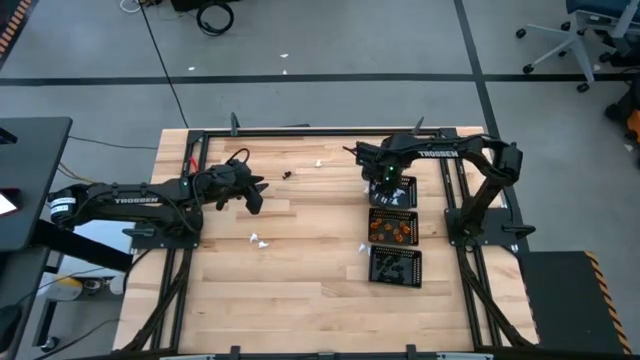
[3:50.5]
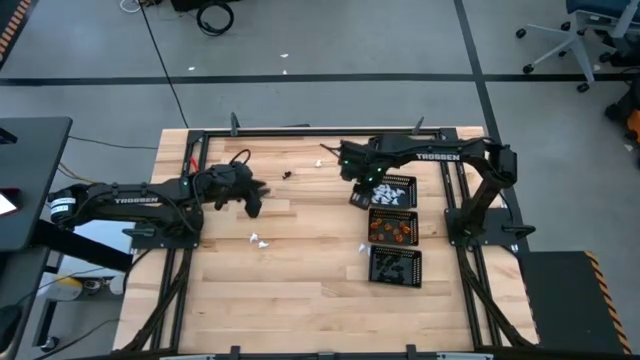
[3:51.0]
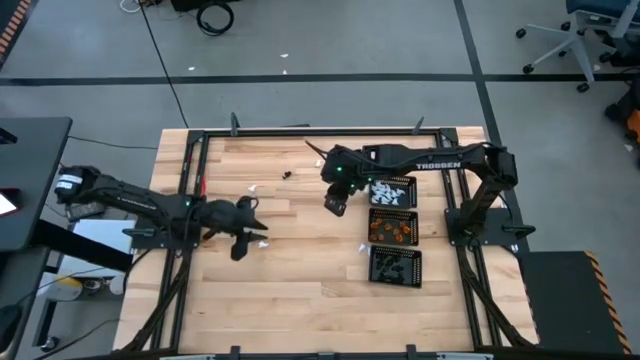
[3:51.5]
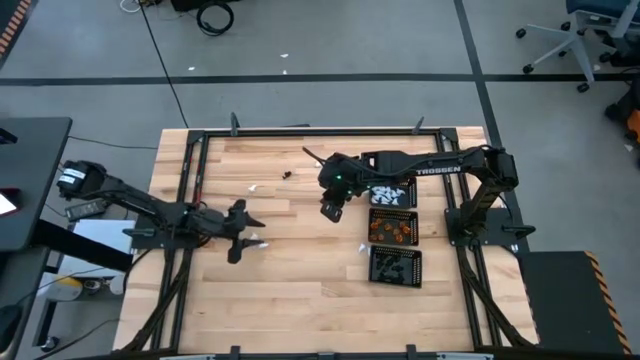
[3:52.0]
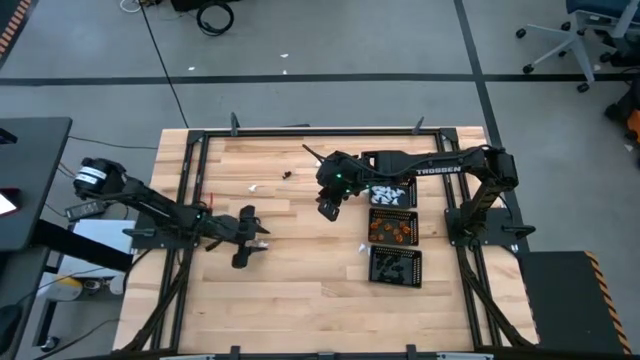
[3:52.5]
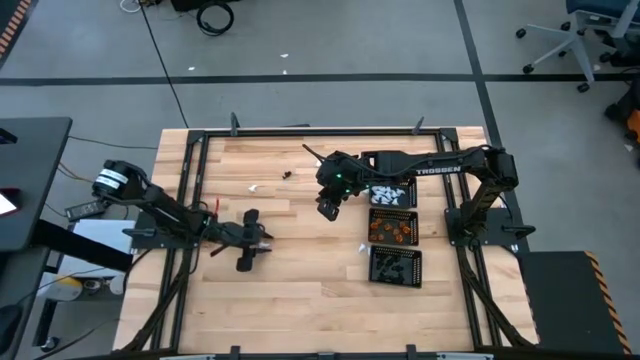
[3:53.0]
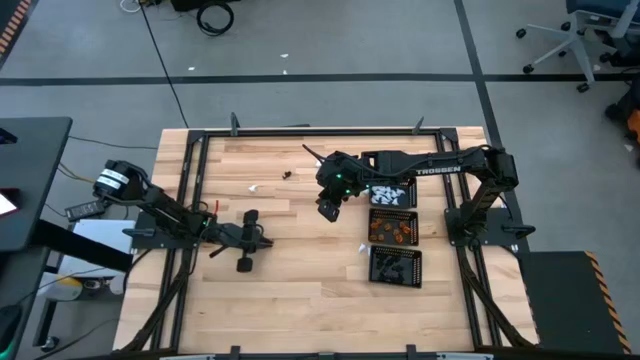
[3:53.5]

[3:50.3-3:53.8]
Task: Sort Halloween decoration
Put the white ghost toy into the top black bin

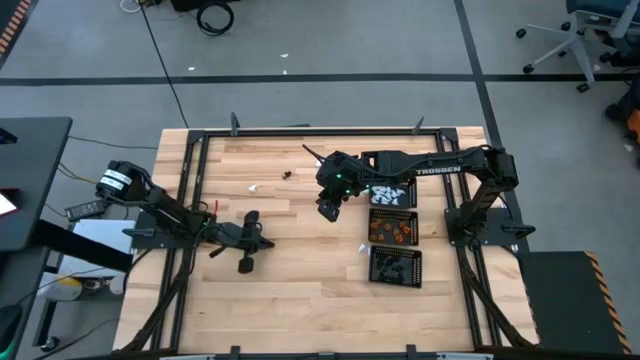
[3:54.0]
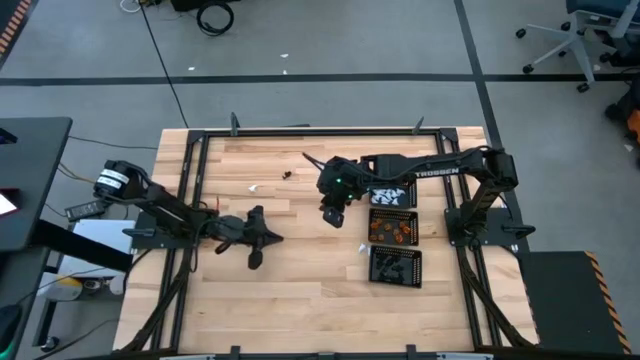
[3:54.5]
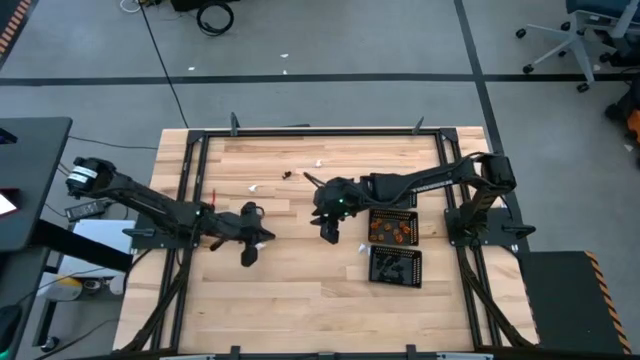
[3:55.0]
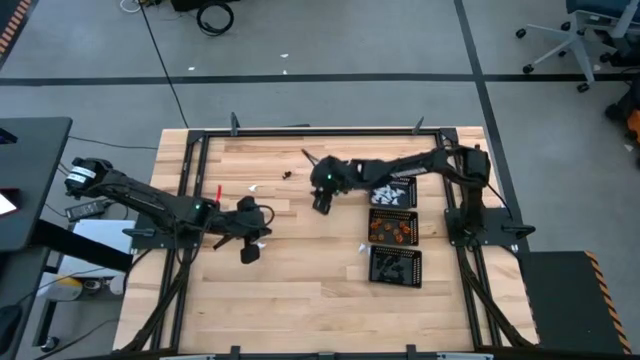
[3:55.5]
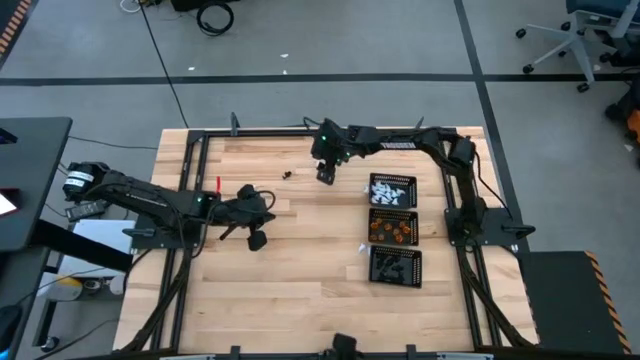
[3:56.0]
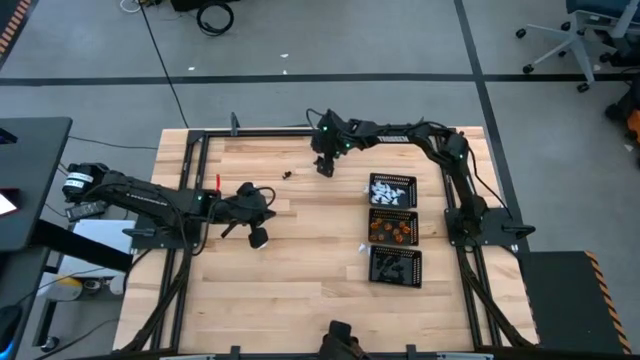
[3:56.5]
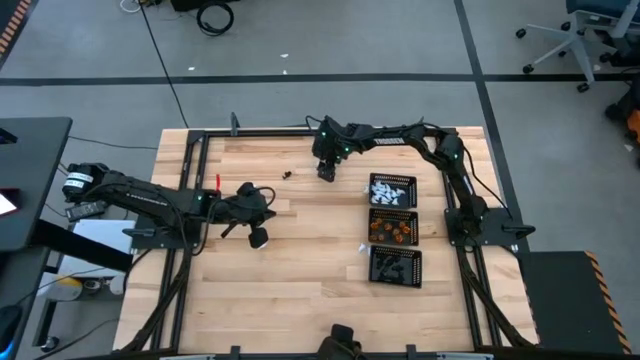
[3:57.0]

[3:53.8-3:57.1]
Put the white ghost toy into the top black bin

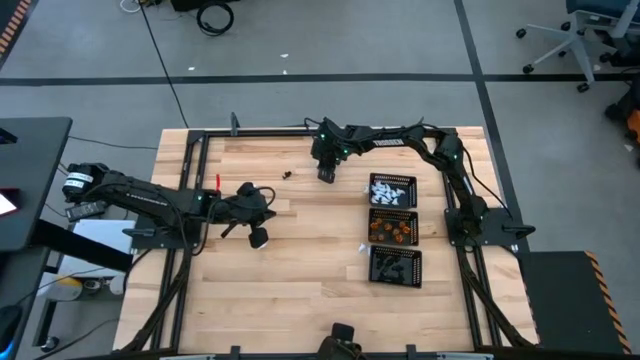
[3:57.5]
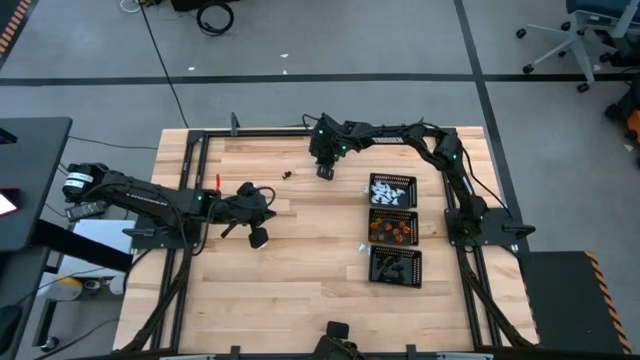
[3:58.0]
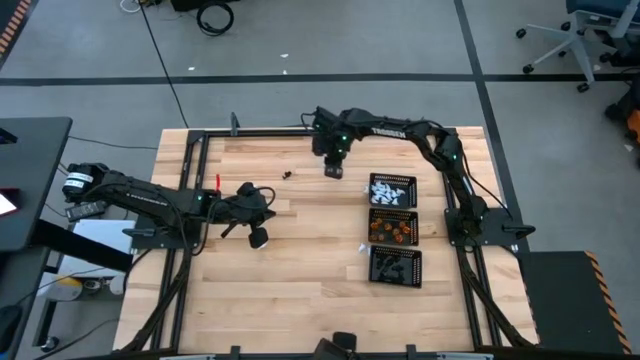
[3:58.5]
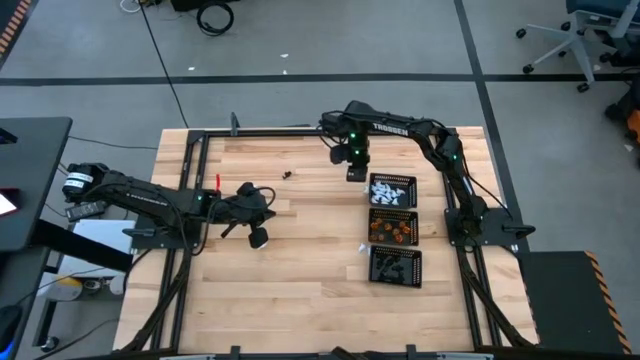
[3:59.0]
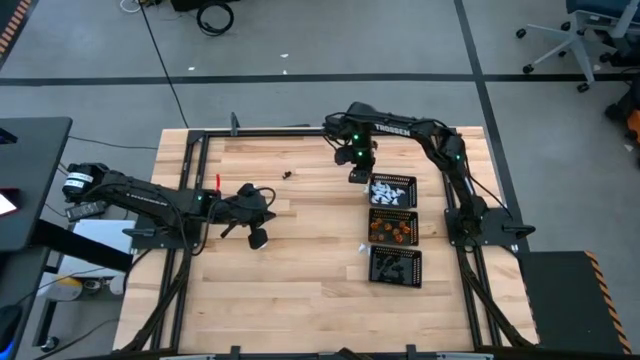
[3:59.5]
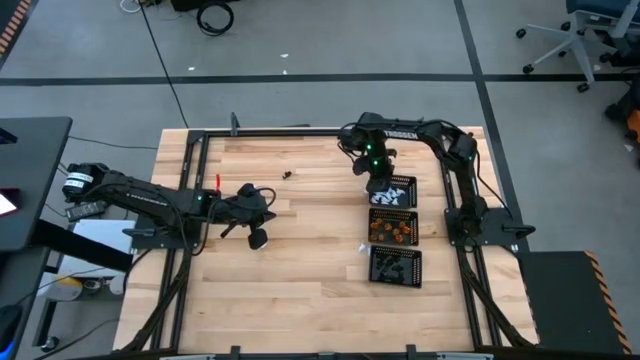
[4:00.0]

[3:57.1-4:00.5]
Put the white ghost toy into the top black bin

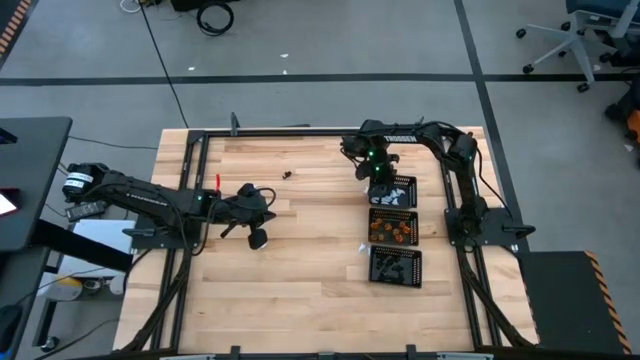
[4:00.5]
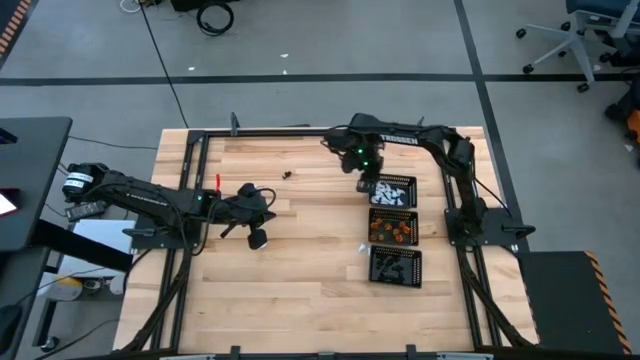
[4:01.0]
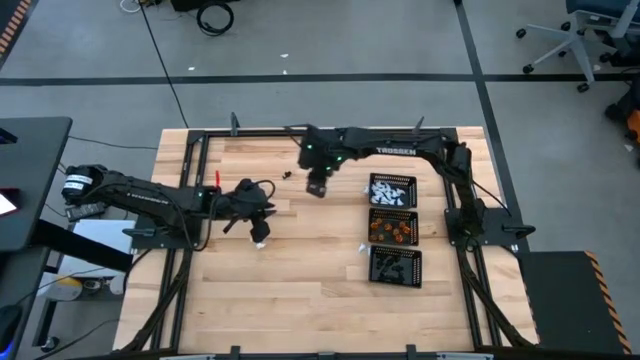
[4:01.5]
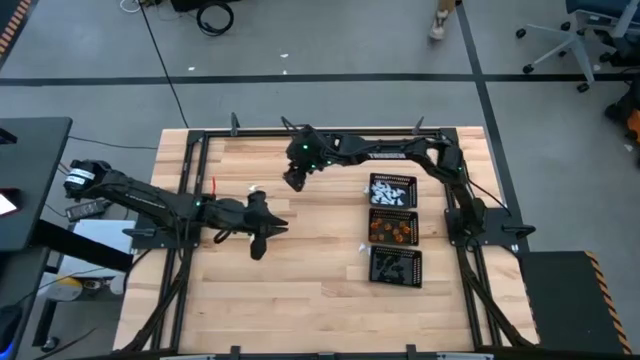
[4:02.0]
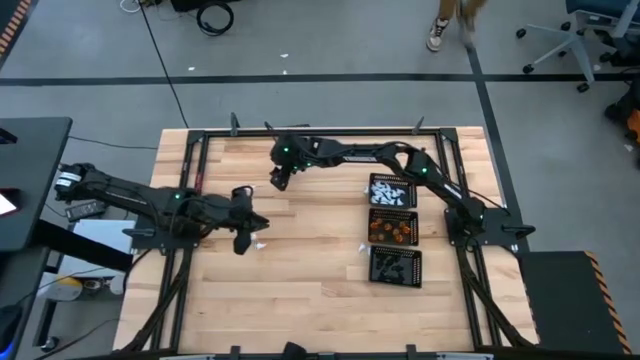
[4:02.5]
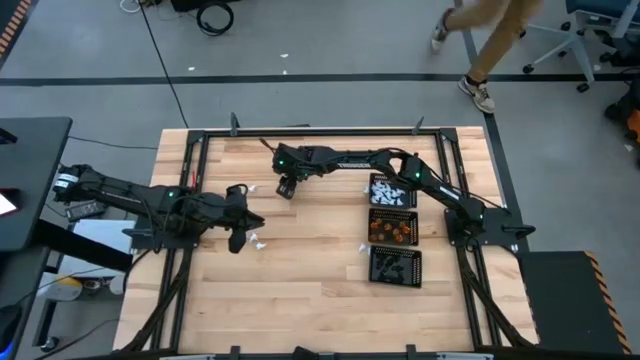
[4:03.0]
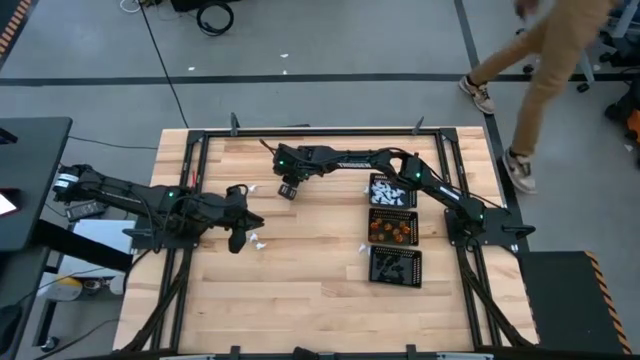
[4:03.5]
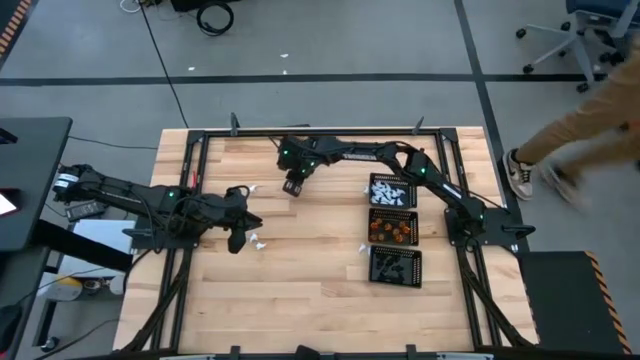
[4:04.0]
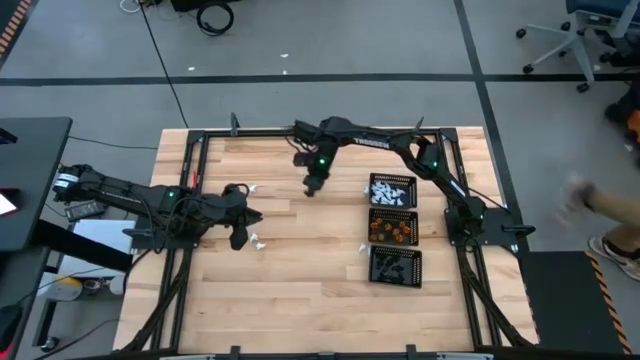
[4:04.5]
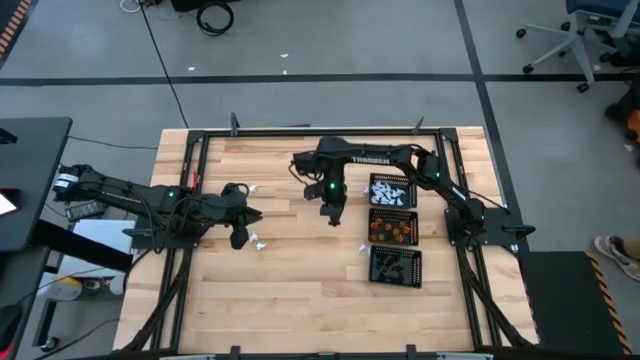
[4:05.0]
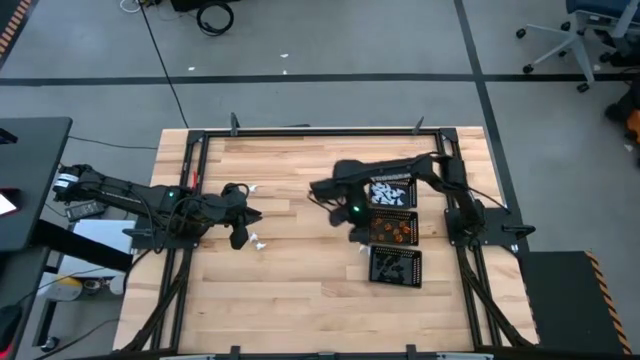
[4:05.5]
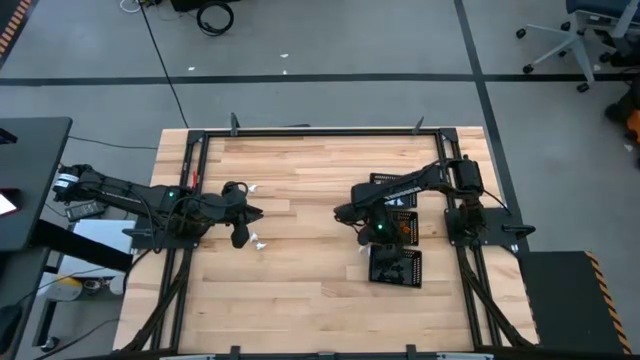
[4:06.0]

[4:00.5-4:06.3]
Put the black ghost toy into the bottom black bin
